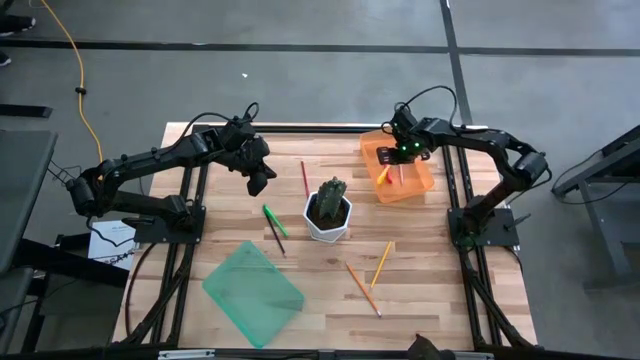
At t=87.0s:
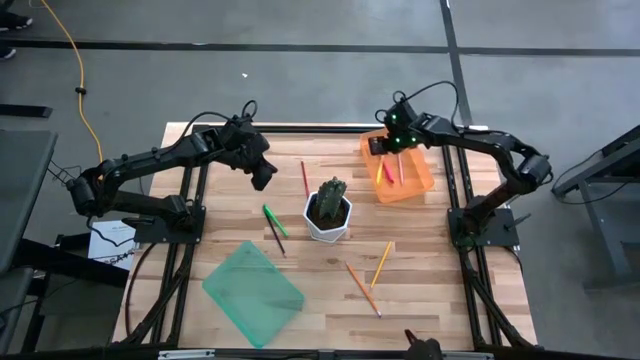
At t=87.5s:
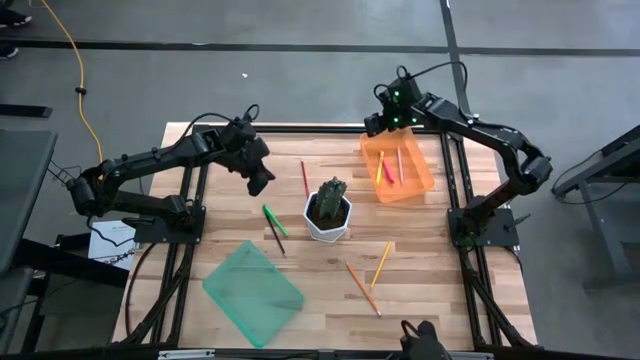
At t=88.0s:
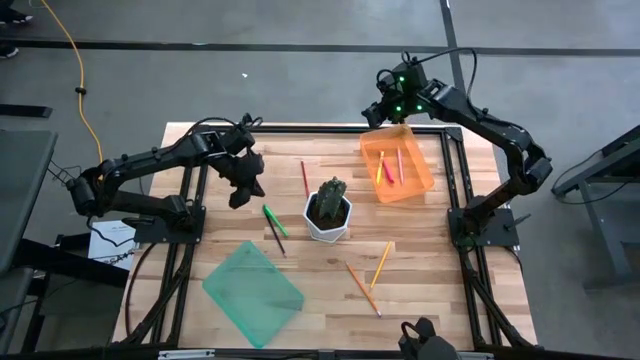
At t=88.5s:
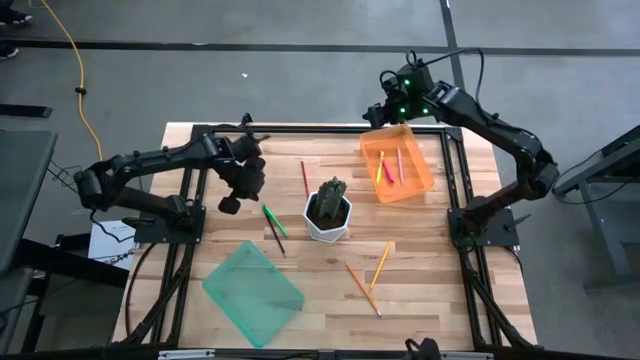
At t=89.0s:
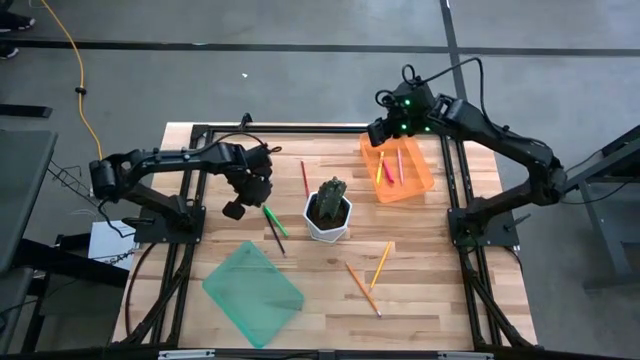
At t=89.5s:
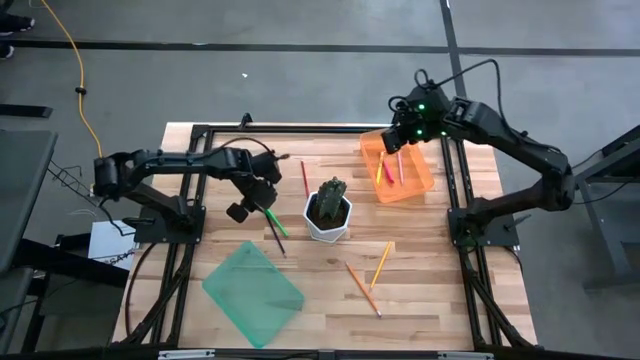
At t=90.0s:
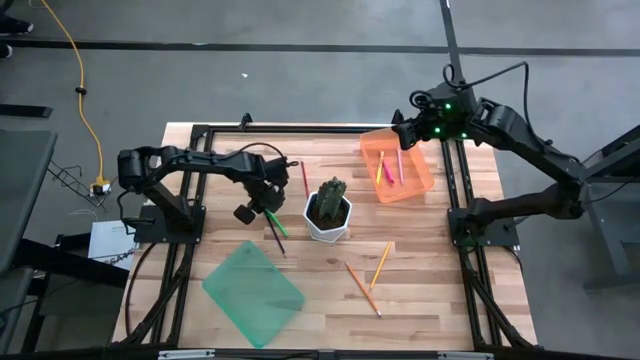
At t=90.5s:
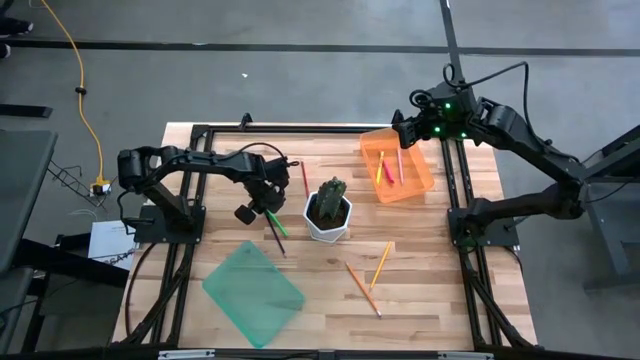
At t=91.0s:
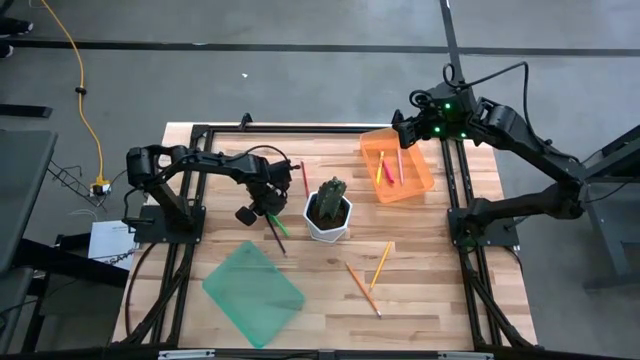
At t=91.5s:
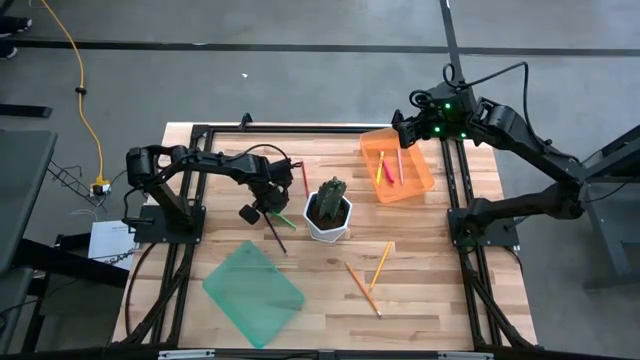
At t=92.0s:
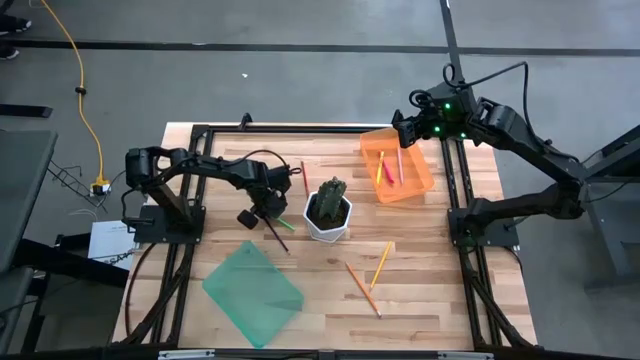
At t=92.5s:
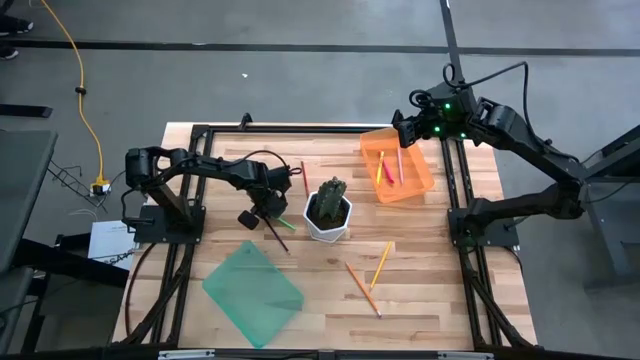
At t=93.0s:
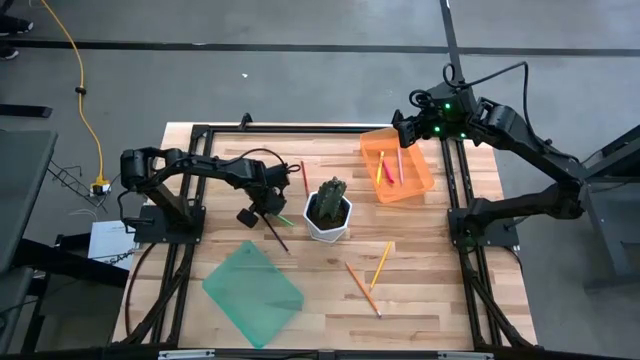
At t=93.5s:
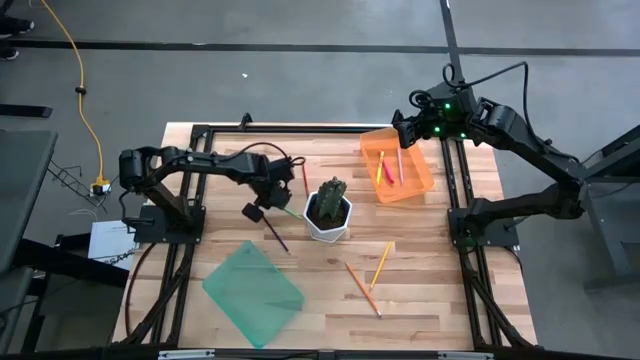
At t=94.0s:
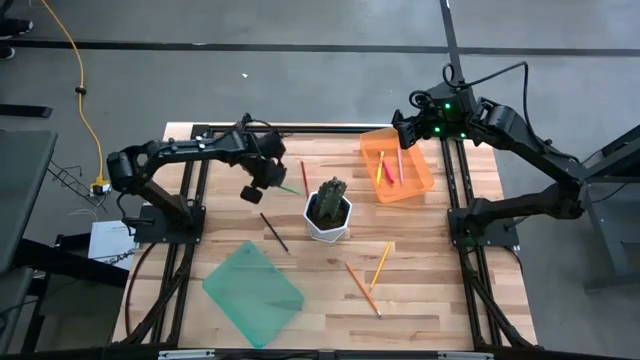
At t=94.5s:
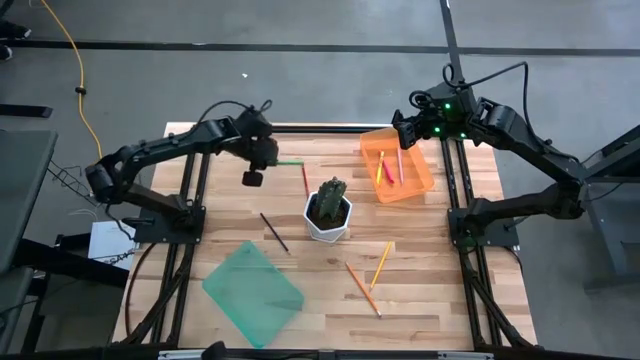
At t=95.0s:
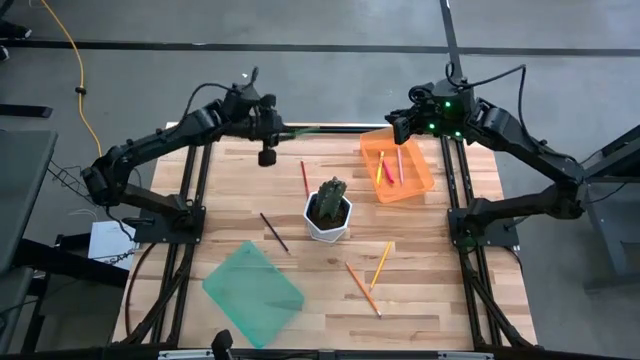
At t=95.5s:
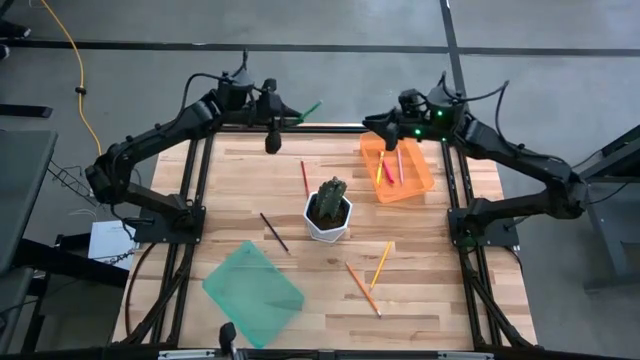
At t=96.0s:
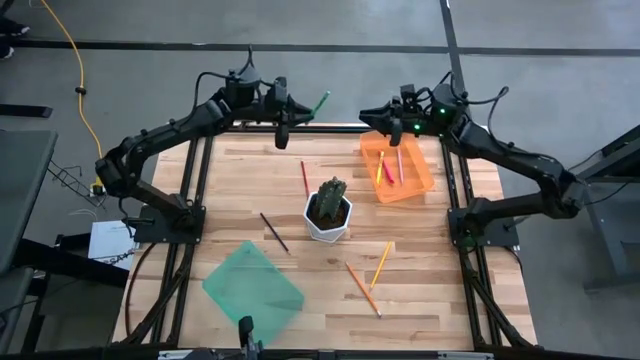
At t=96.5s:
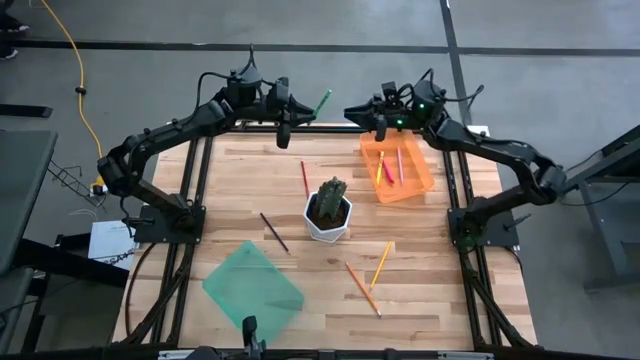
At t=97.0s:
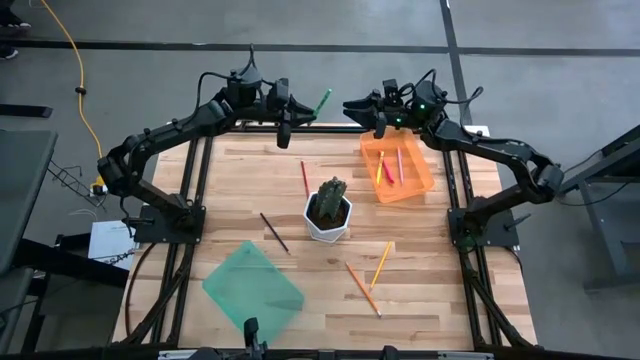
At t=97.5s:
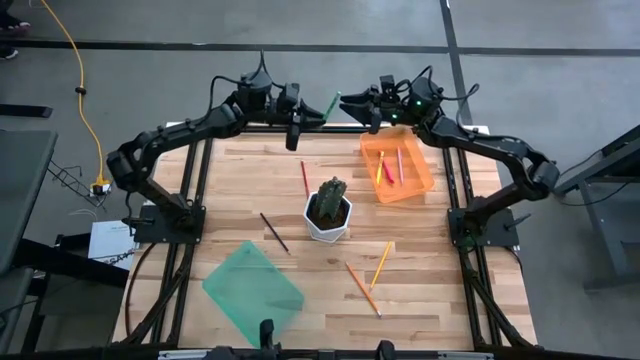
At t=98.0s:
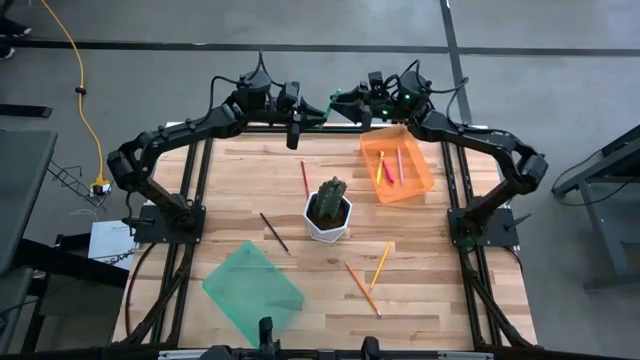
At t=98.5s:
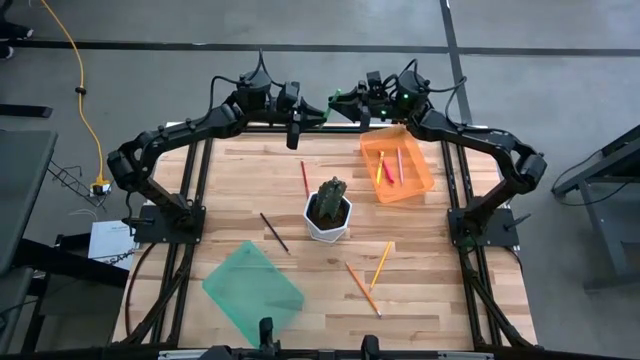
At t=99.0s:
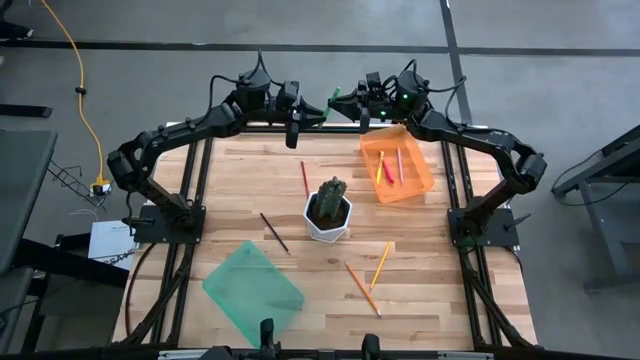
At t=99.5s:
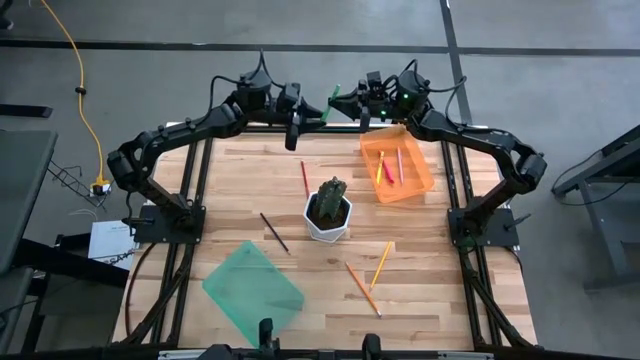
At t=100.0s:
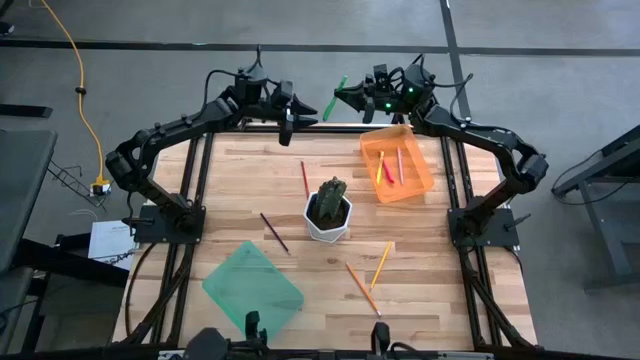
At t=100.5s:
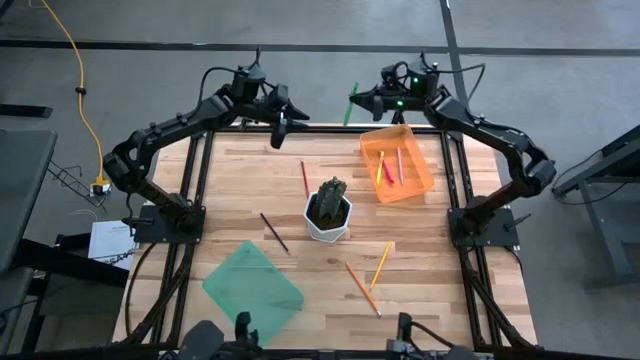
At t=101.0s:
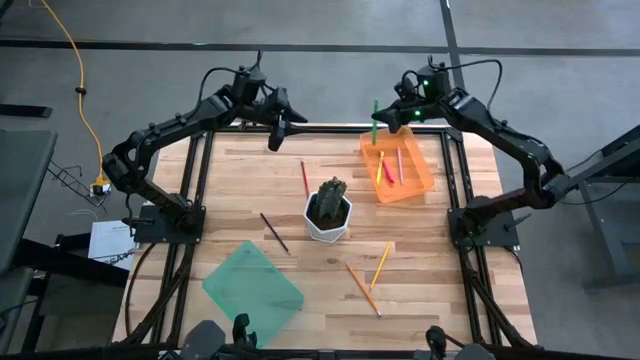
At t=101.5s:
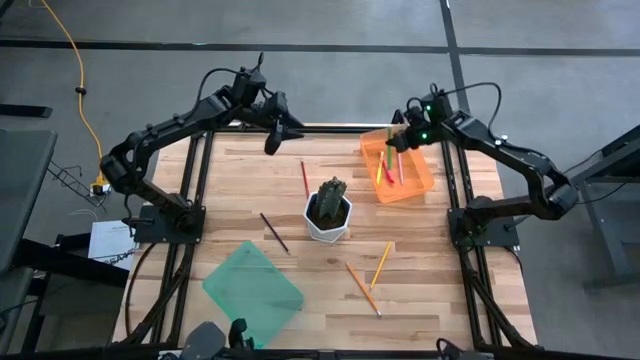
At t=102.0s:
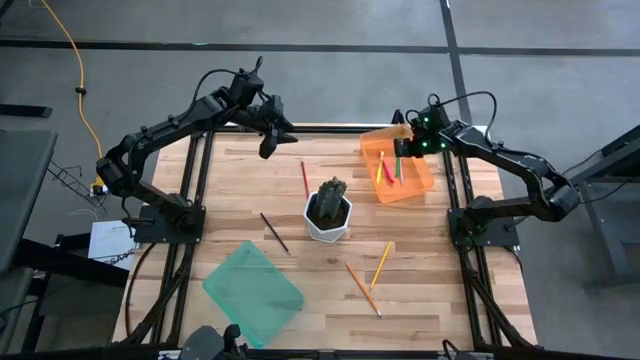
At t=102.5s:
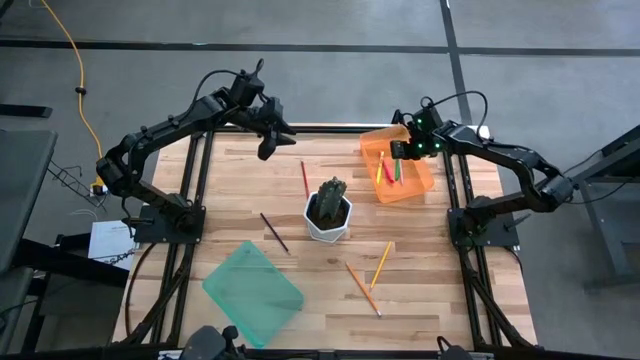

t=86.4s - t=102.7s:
Task: Sort pens & pencils
Put the green pen into the orange bin

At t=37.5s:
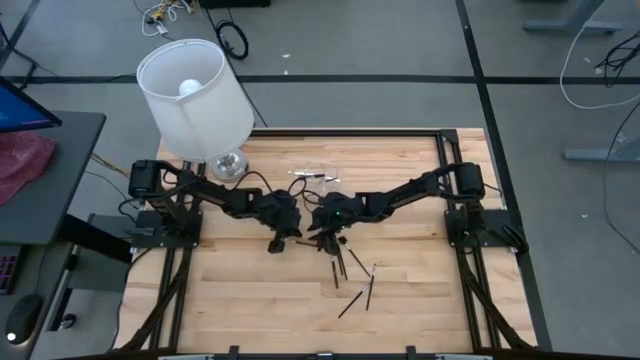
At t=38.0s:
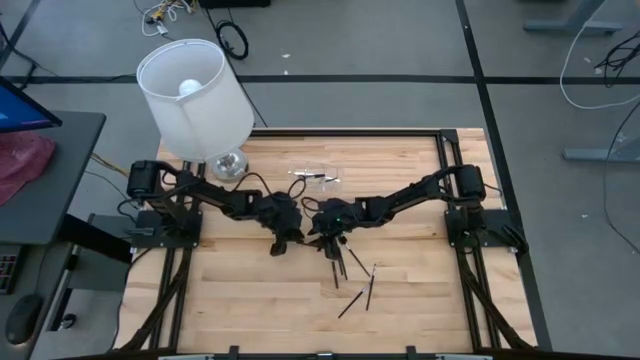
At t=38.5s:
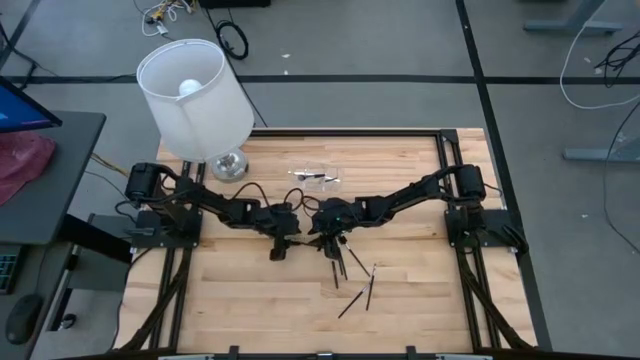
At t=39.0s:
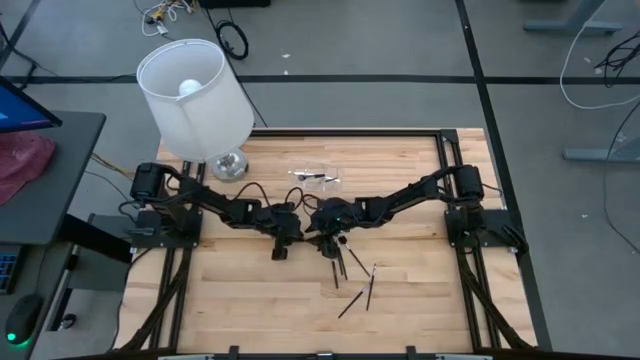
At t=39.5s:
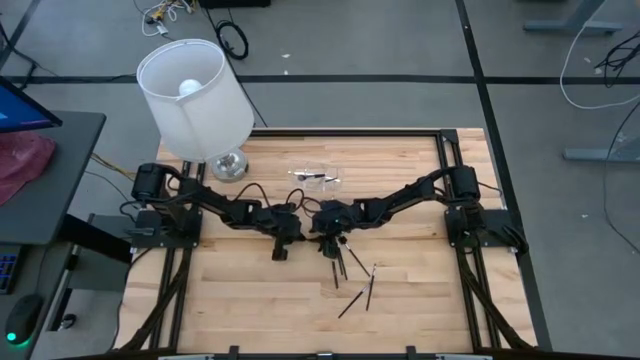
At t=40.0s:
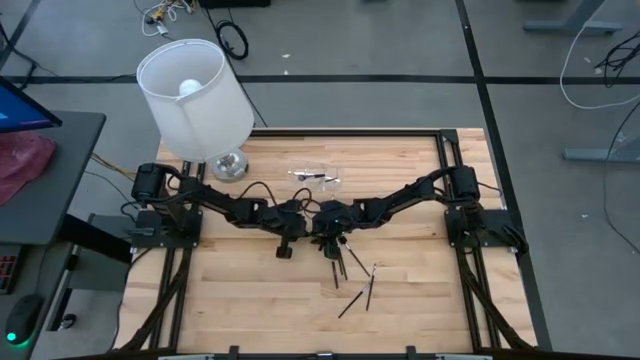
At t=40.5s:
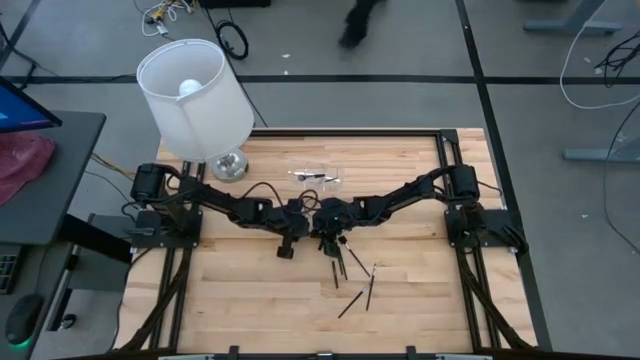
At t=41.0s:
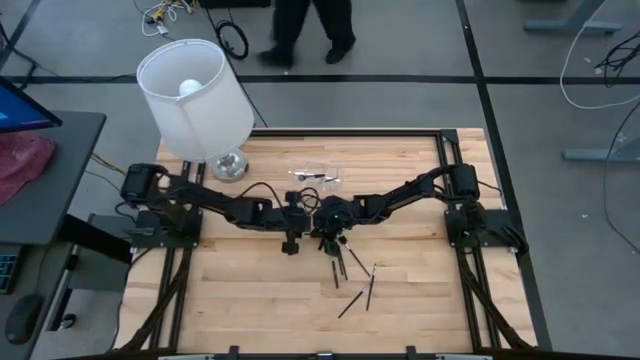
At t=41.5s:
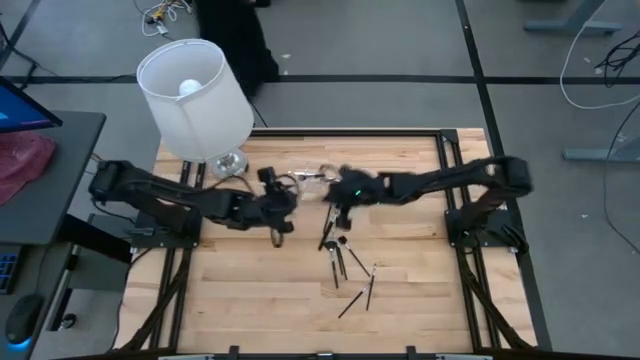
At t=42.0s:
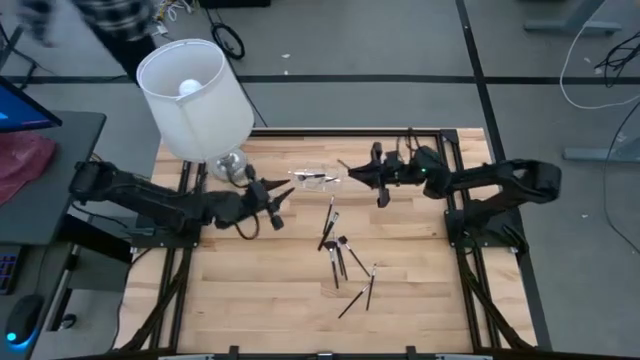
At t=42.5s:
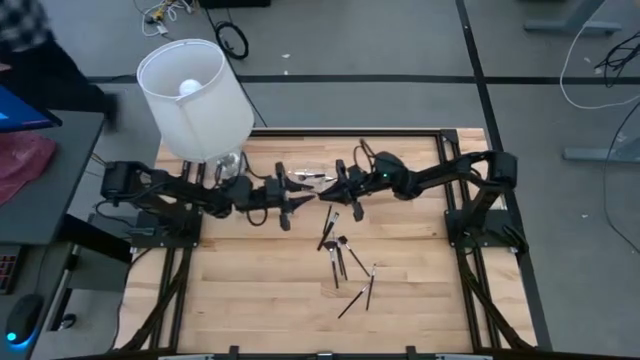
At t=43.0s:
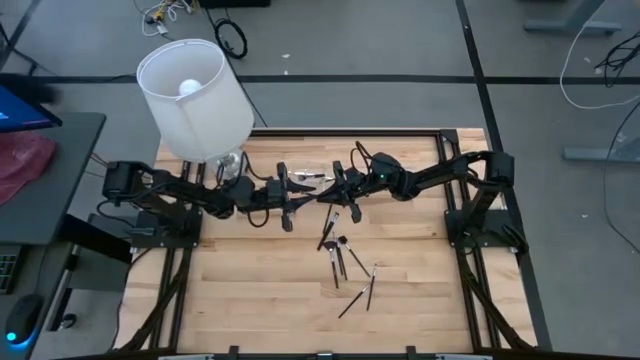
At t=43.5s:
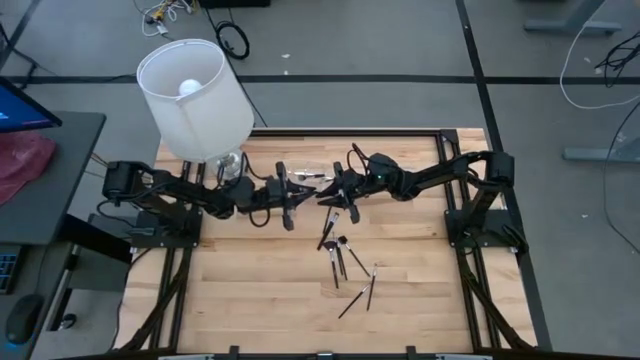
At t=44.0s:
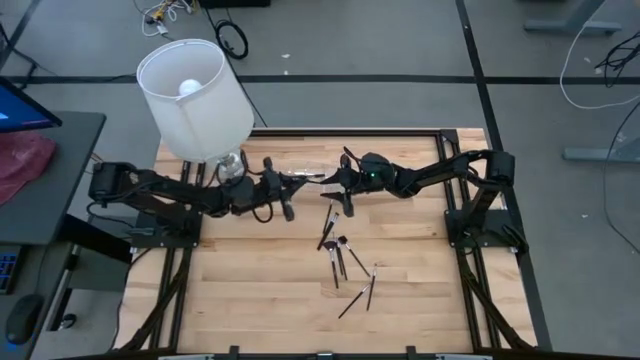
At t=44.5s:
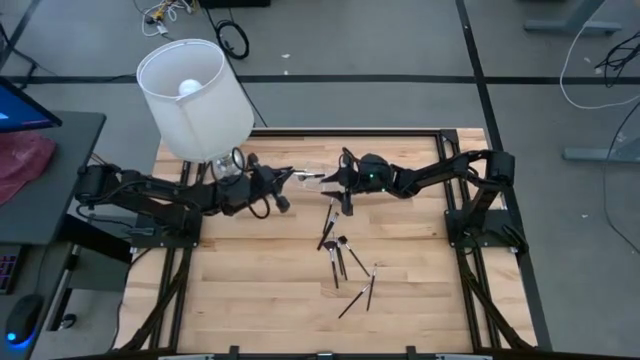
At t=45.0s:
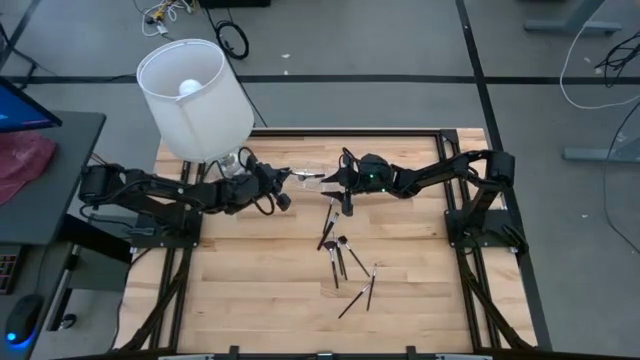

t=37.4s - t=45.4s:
Task: Put items in baskets/containers
Put the black eyeshadow brush into the transparent organizer
